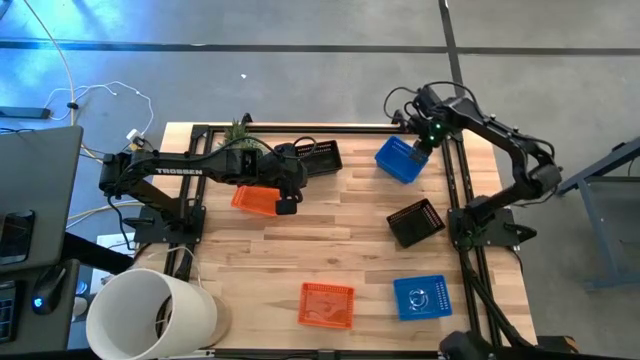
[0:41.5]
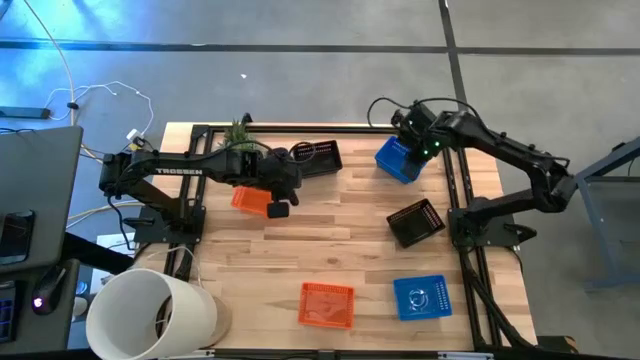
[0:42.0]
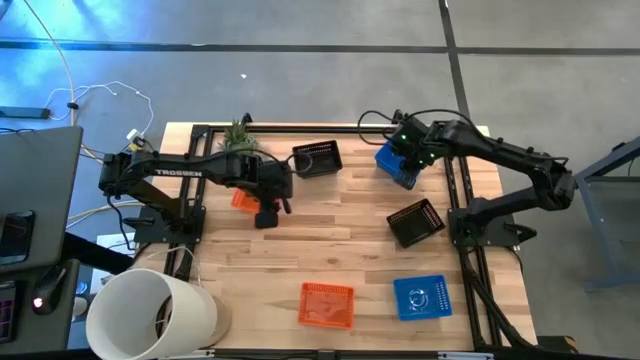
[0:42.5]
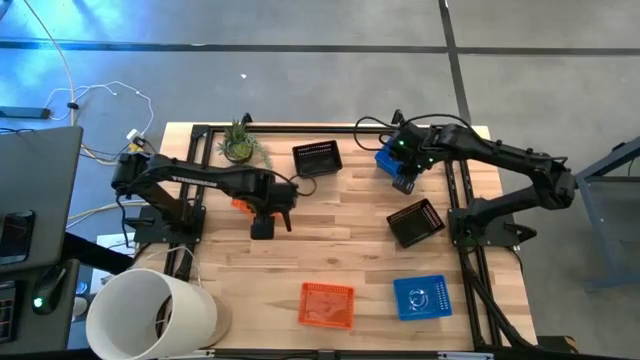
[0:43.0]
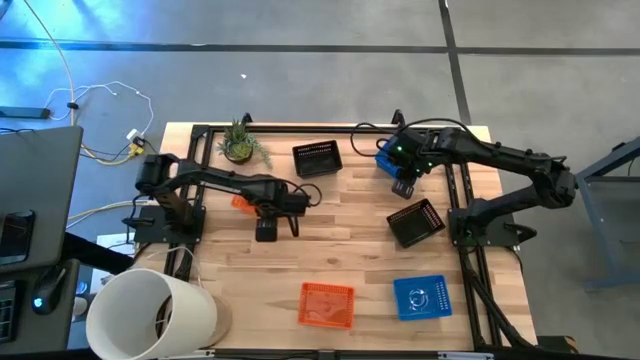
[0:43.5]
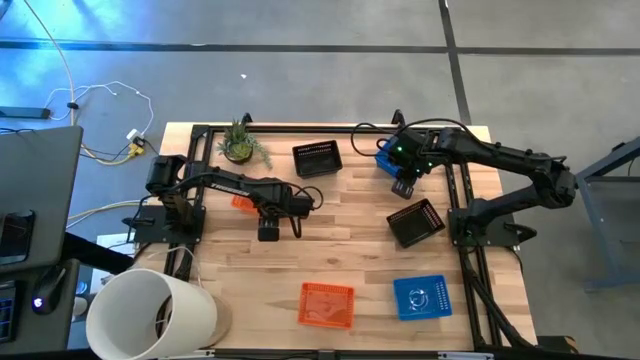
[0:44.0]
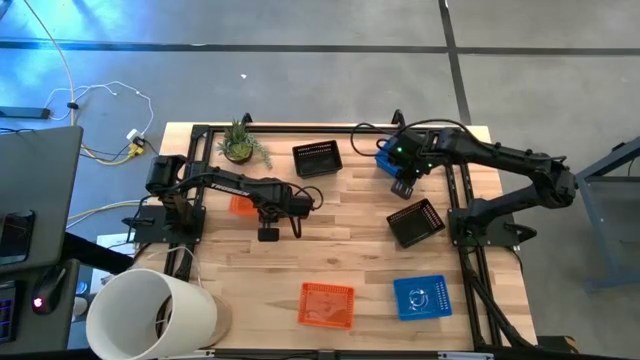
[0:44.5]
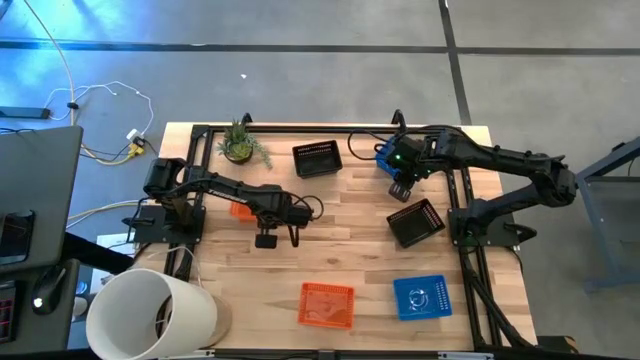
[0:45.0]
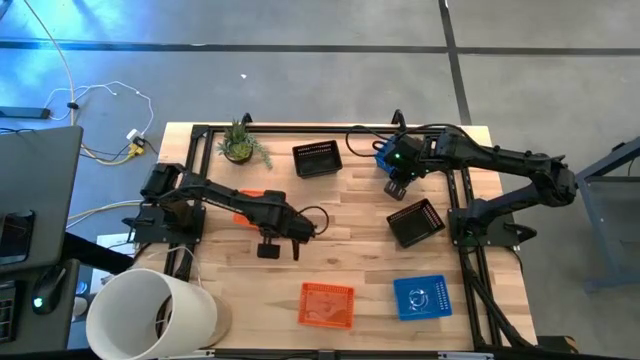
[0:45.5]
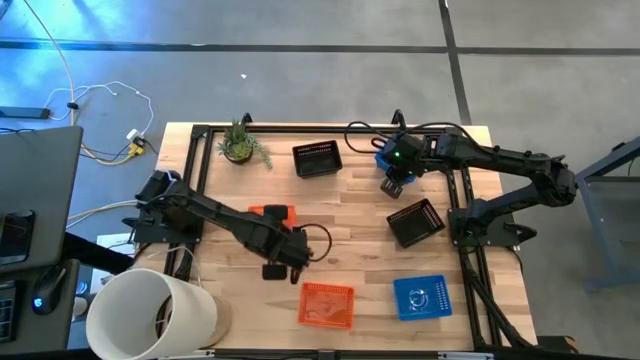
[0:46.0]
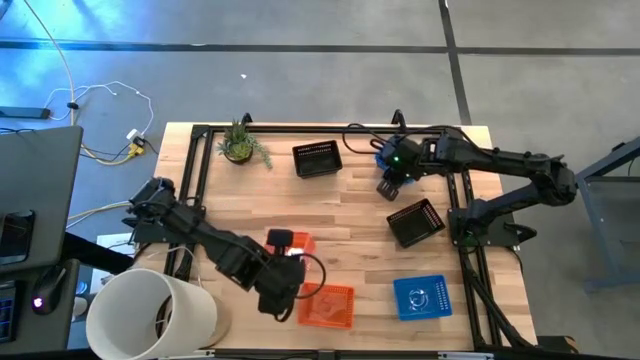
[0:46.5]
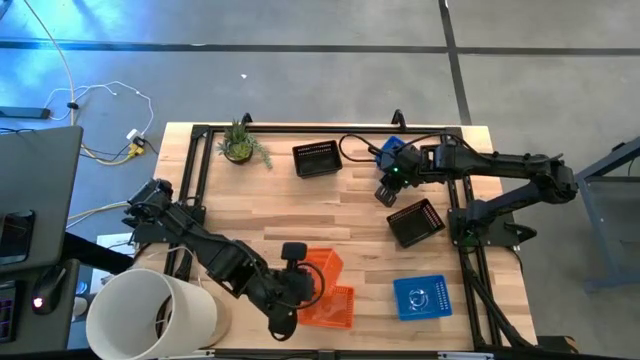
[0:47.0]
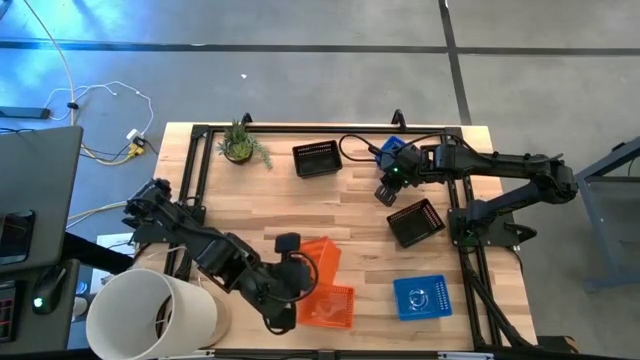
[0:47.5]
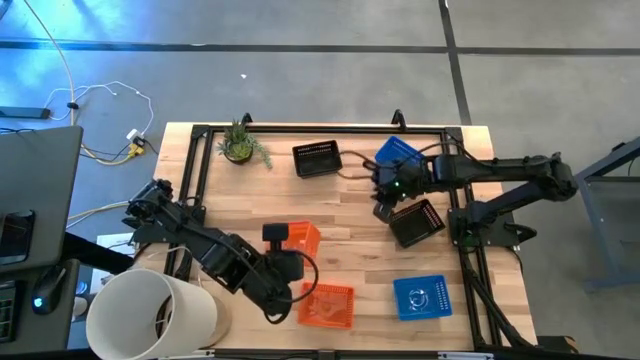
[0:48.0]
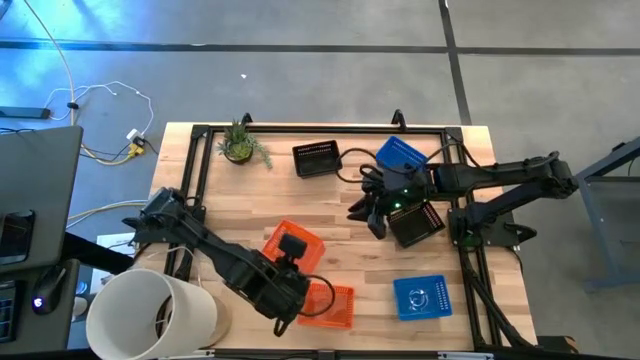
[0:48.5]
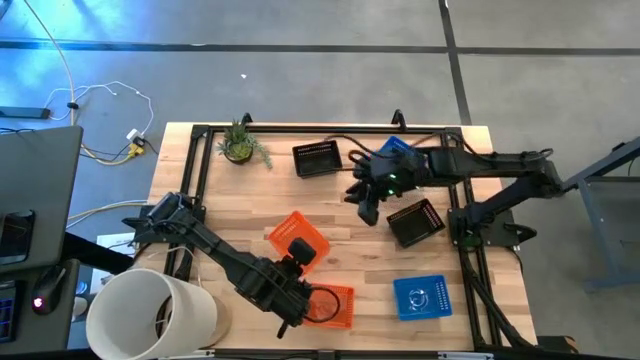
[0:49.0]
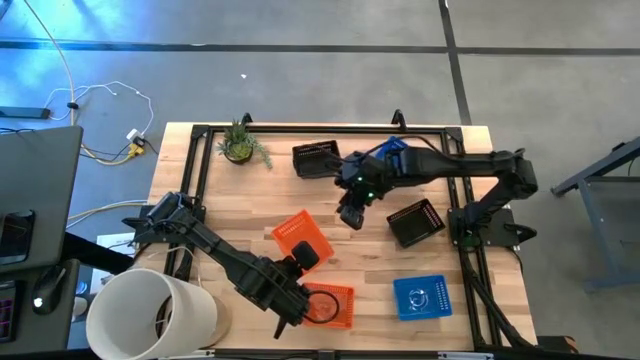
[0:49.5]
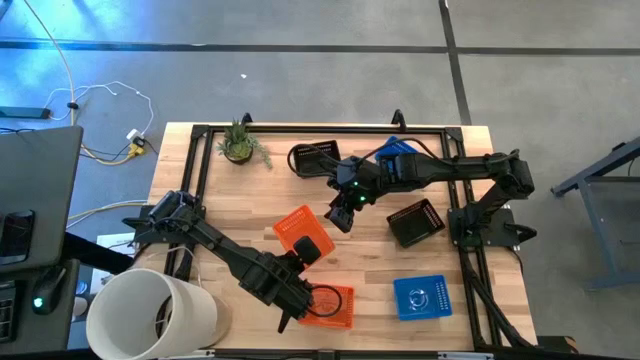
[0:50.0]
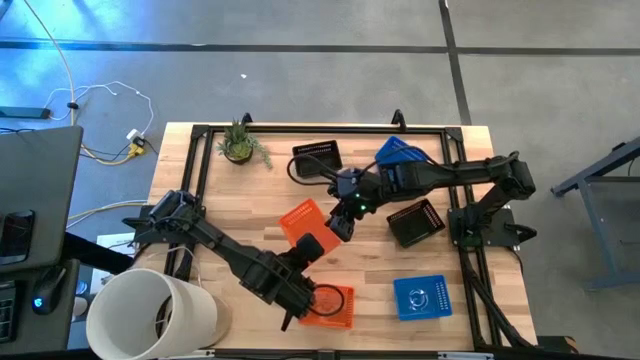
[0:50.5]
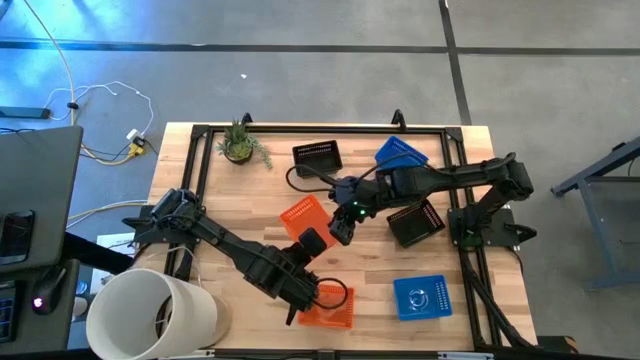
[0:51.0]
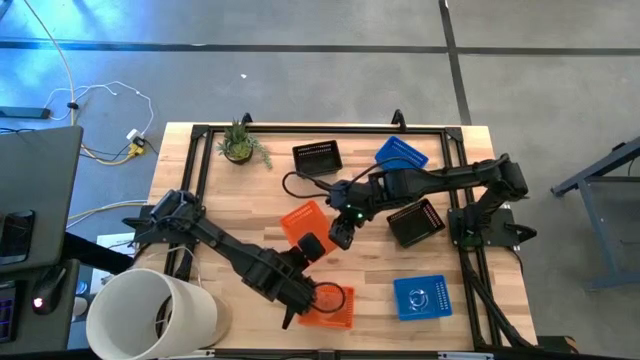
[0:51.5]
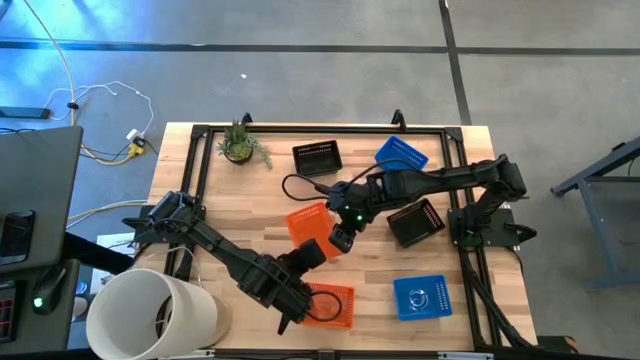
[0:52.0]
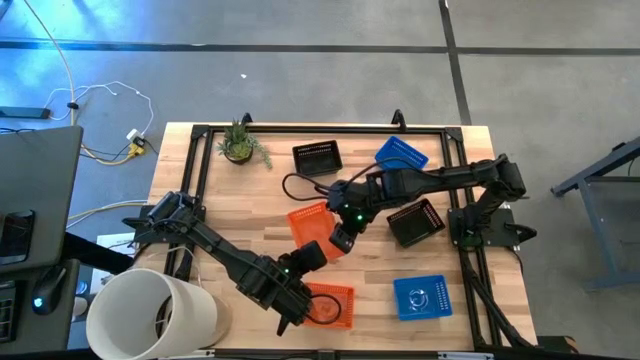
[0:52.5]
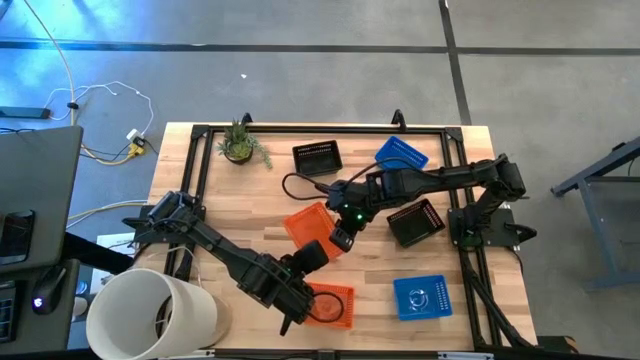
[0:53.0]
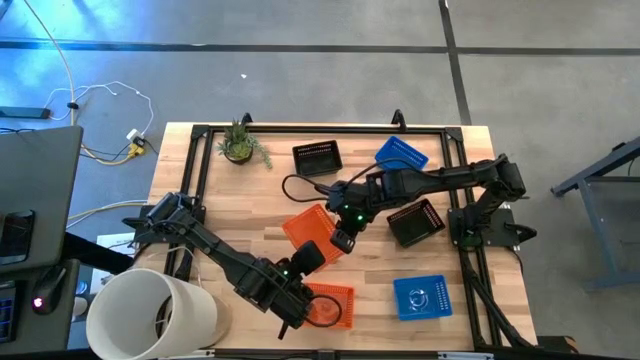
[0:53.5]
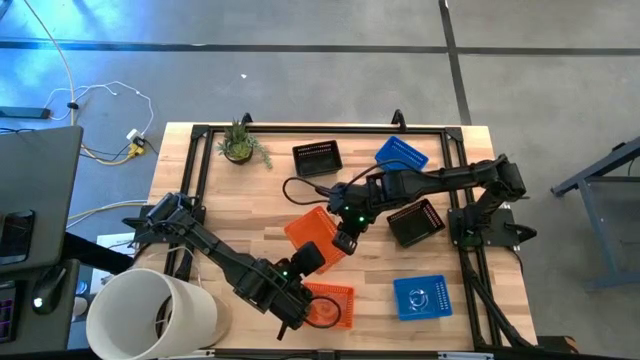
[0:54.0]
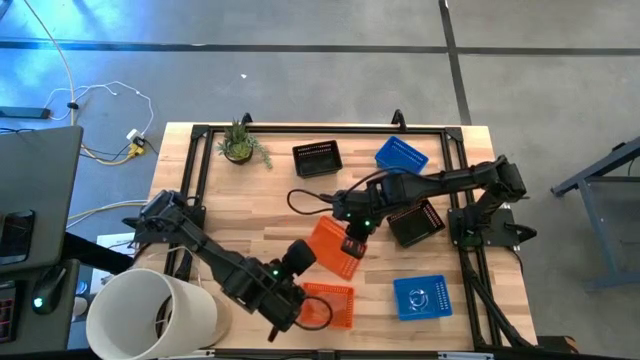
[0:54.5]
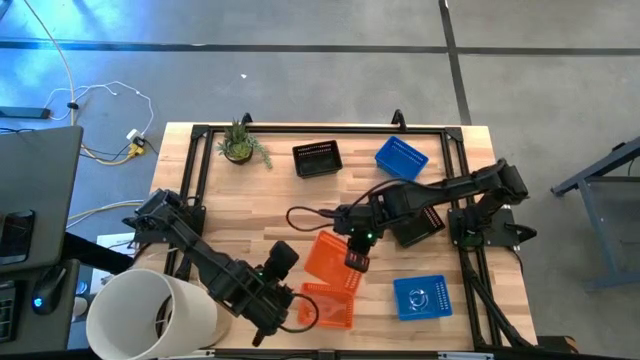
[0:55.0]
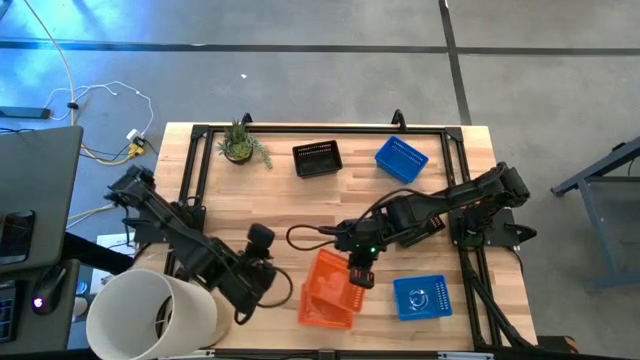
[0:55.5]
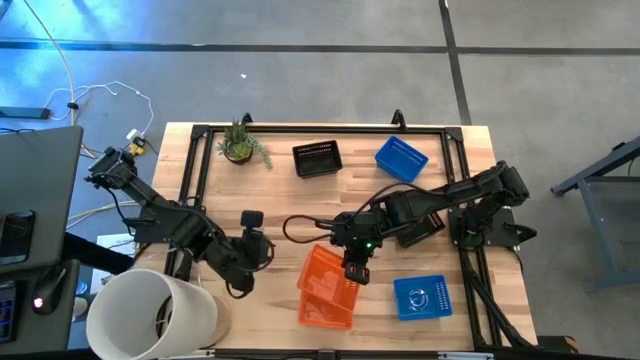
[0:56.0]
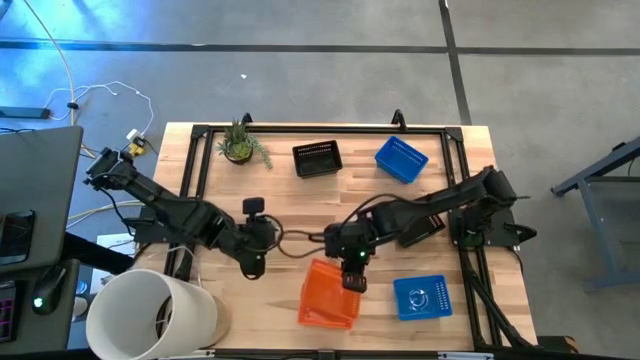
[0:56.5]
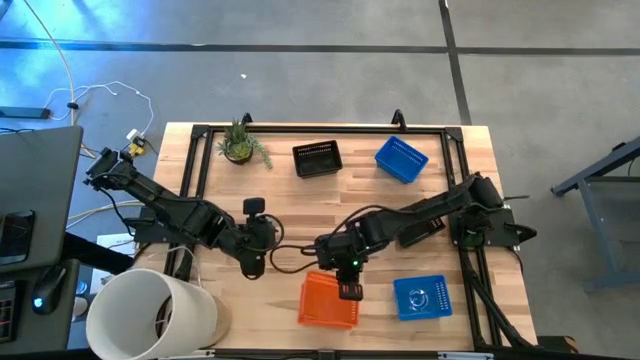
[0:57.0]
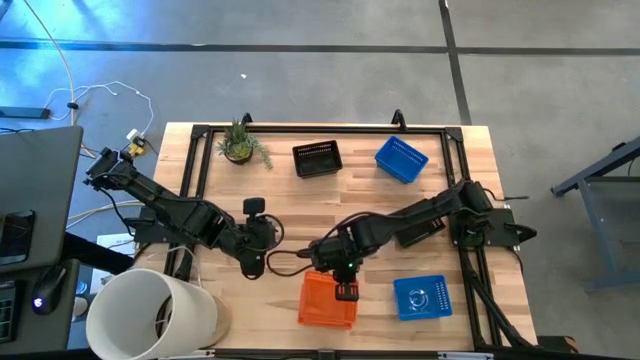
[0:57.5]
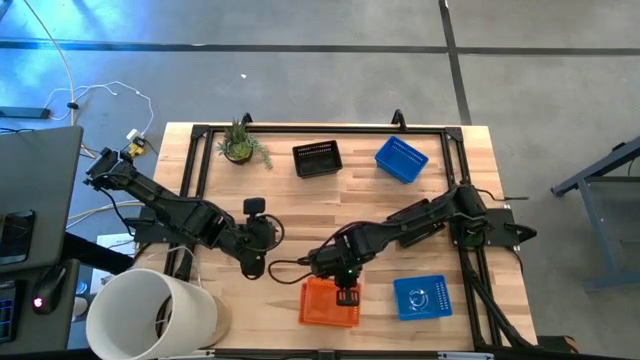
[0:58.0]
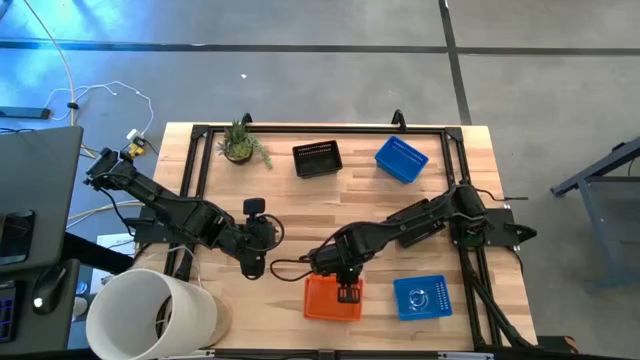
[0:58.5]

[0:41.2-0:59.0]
Stack the top orange basket on top of the bottom orange basket
